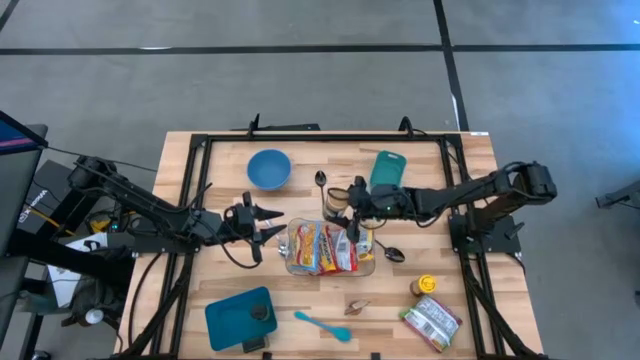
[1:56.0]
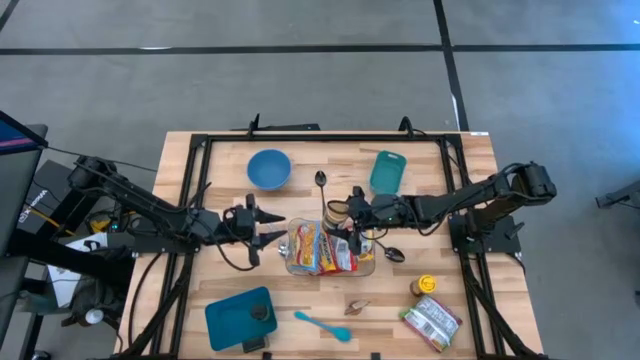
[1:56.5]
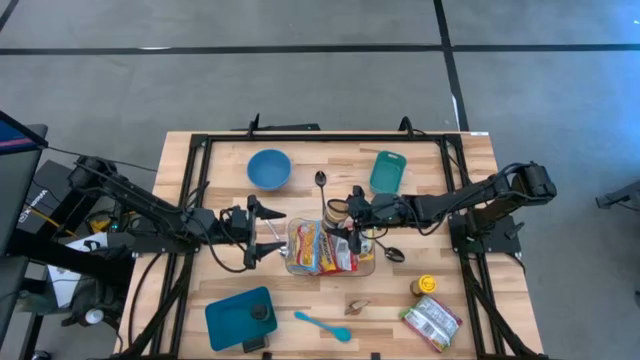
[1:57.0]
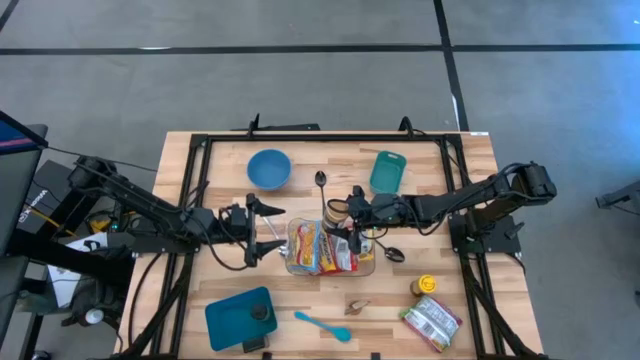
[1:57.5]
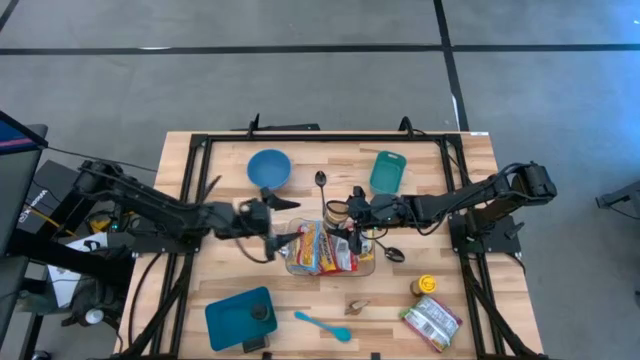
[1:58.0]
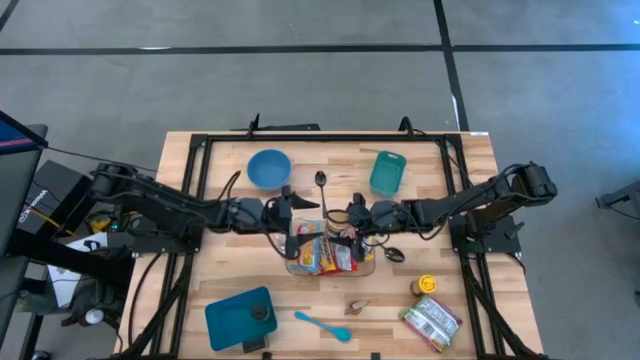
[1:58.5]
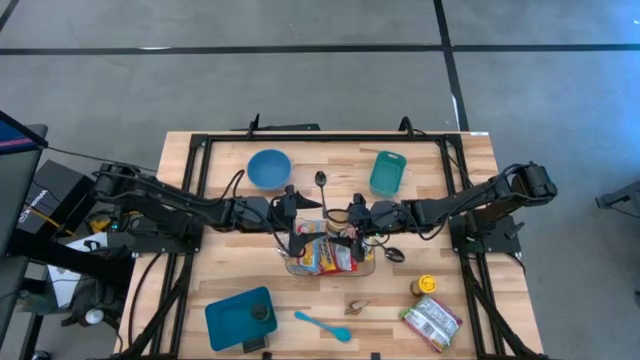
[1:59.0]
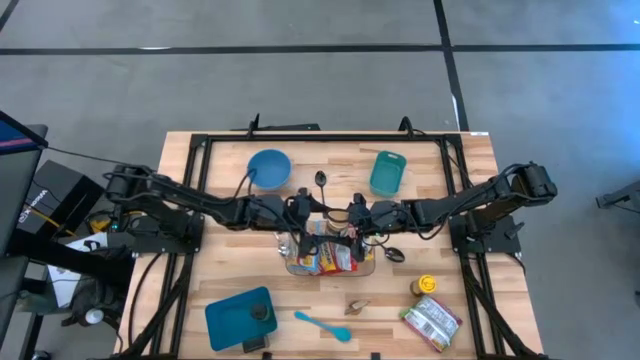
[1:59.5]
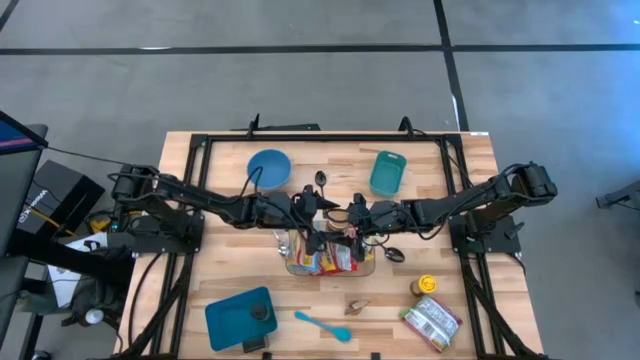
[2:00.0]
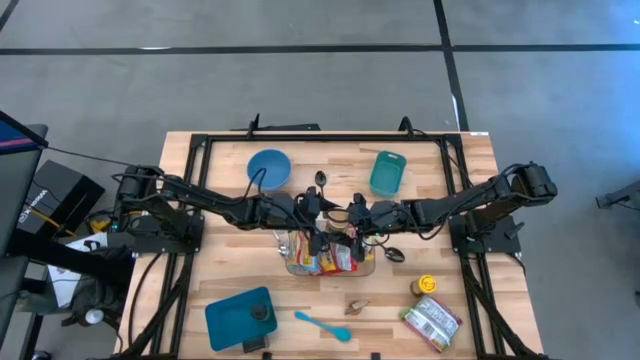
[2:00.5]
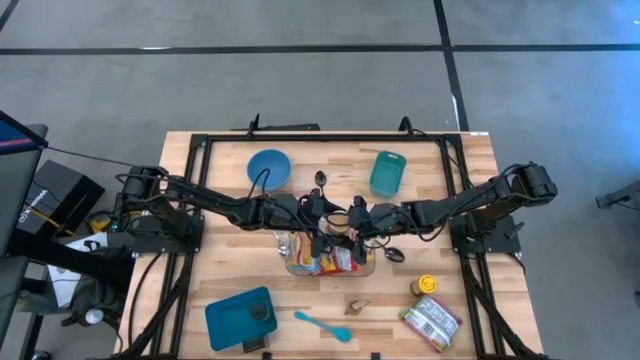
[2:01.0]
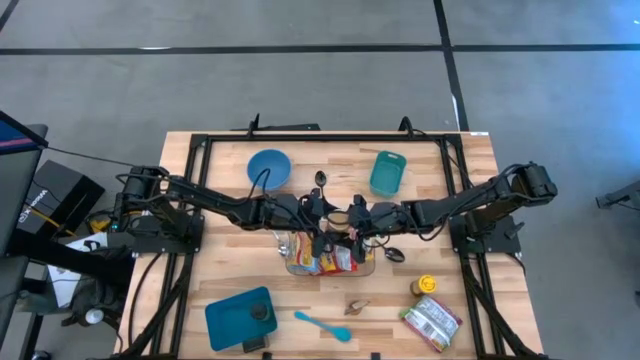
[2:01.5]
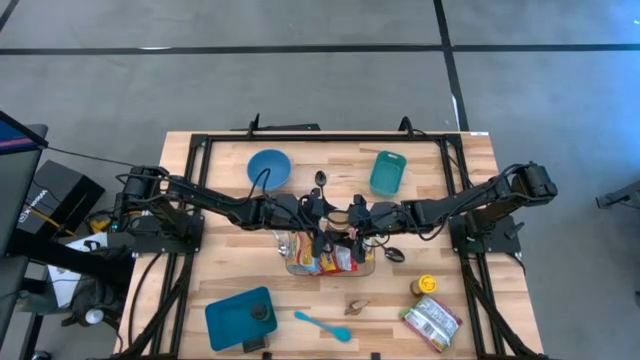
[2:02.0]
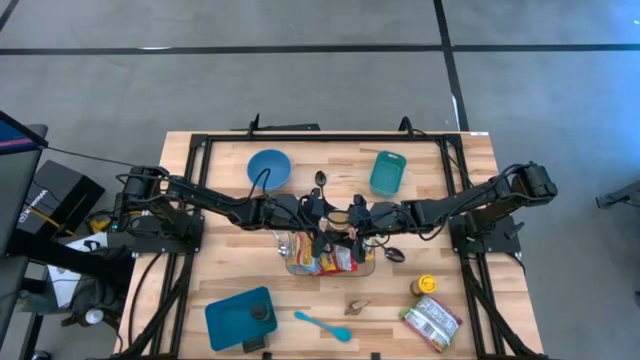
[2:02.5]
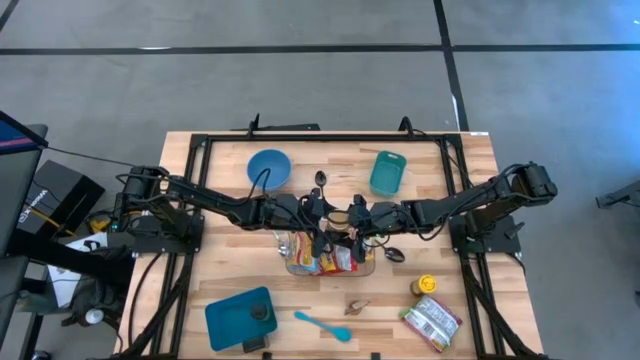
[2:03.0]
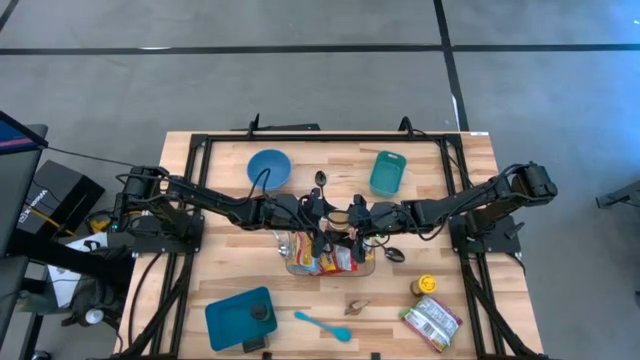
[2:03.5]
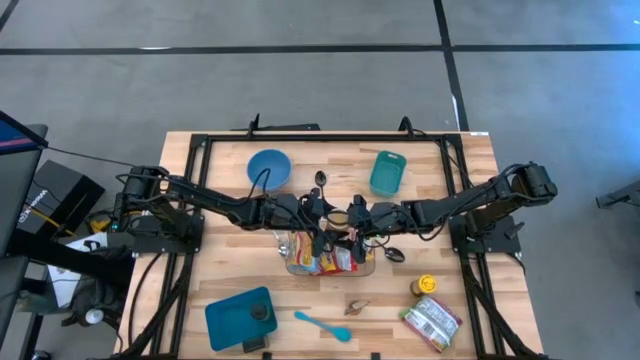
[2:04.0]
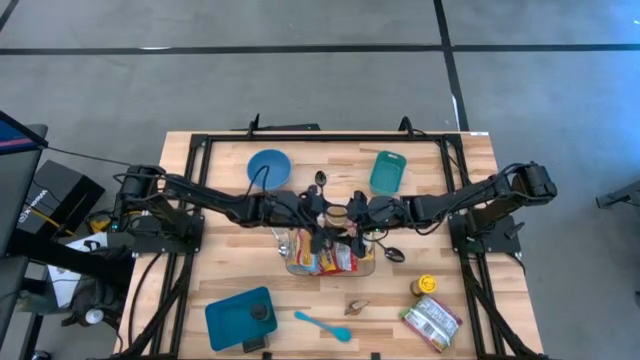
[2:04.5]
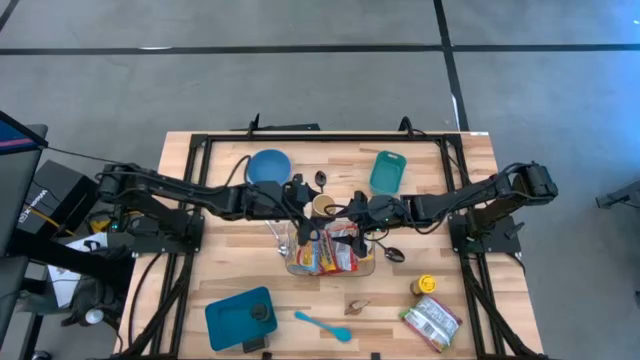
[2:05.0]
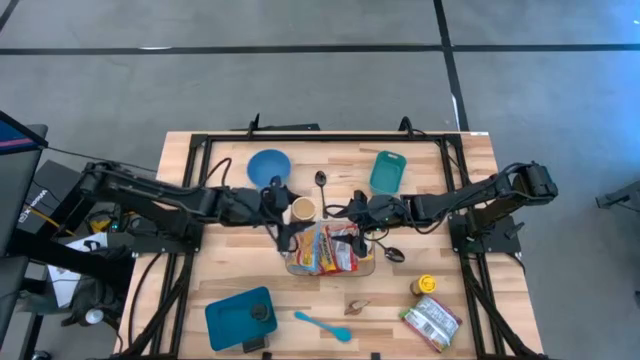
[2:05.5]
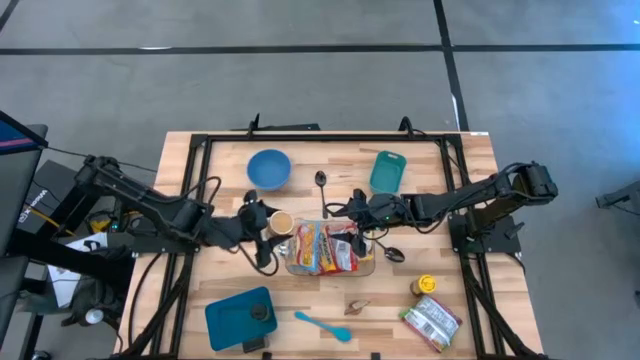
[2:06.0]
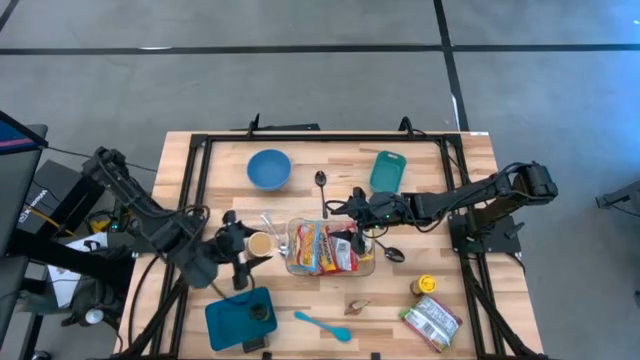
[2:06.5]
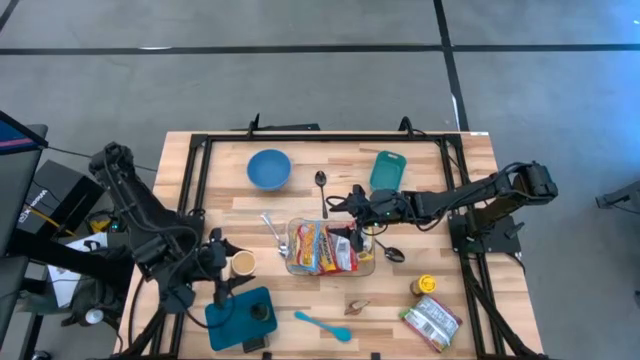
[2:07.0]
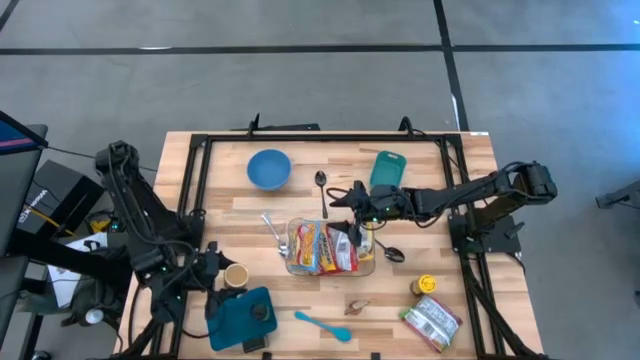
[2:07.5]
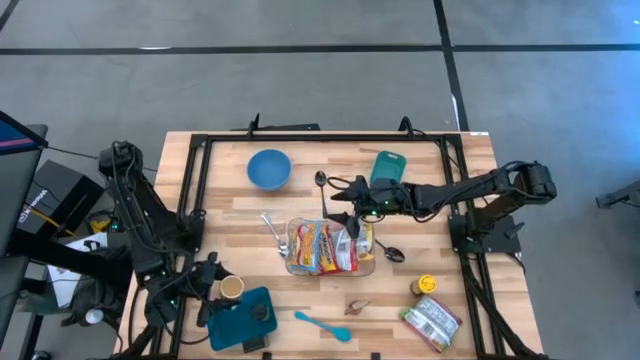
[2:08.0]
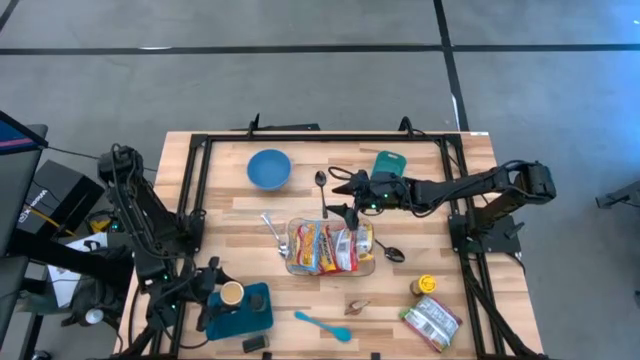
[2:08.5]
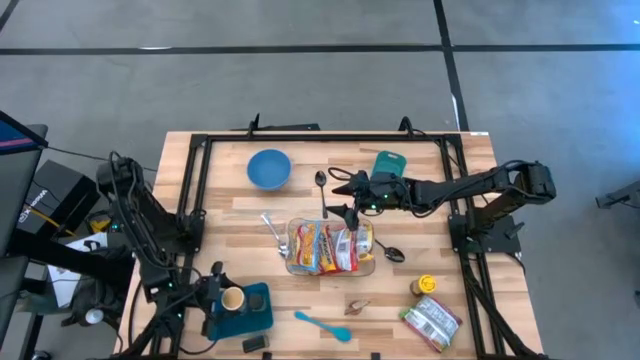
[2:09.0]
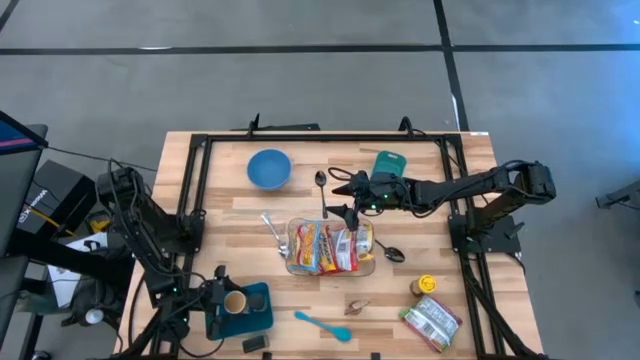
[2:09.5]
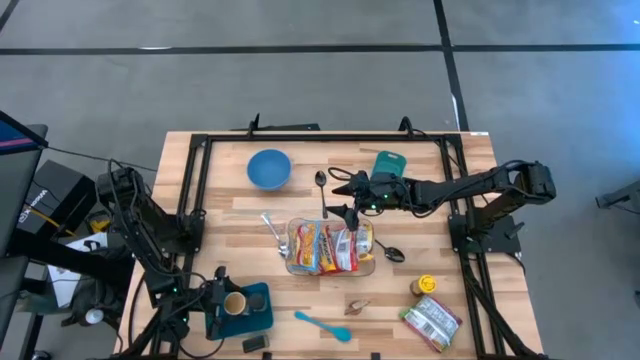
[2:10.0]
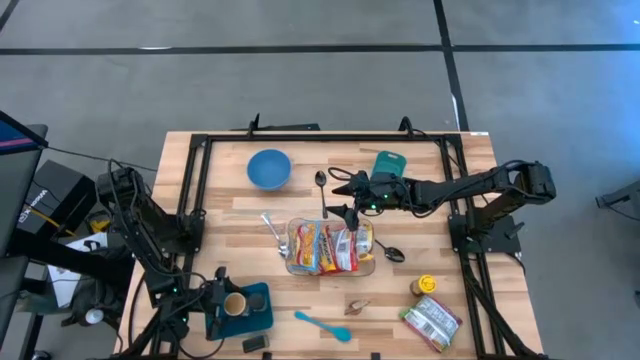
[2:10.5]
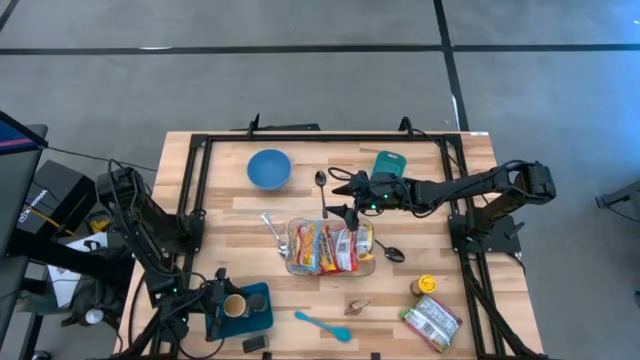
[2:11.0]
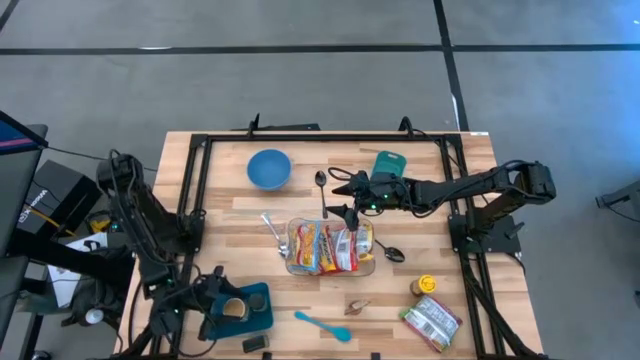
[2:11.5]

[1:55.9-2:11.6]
Task: Pick & Place Food Item
Put the golden spice bottle into the dark blue bin

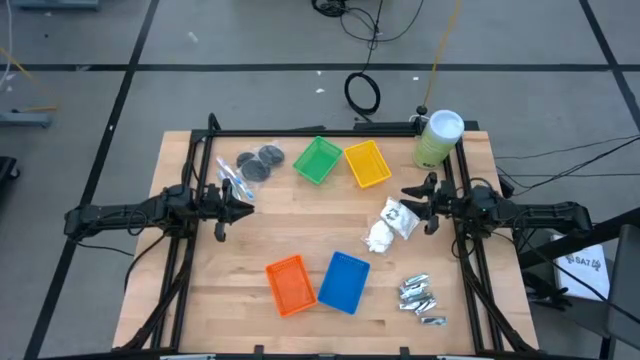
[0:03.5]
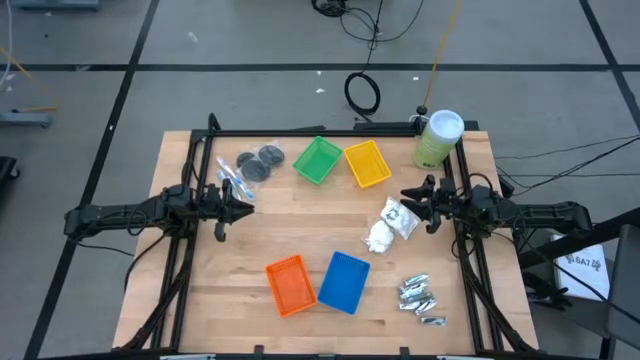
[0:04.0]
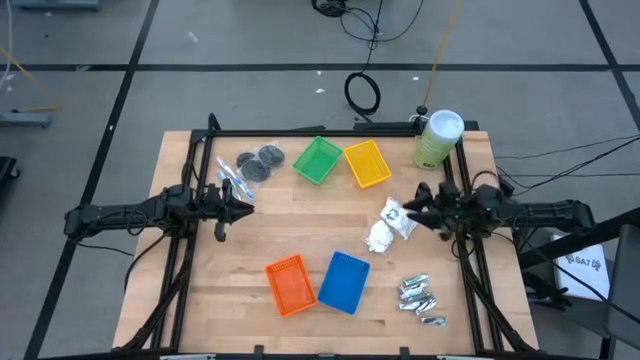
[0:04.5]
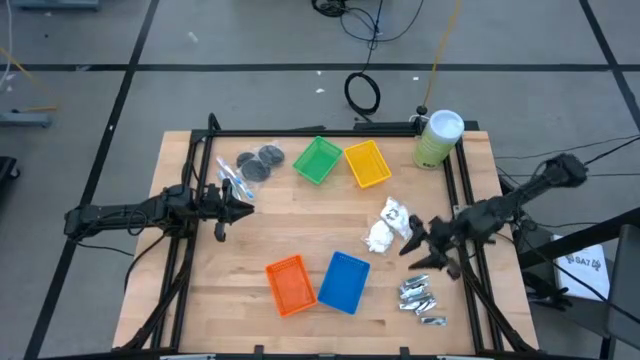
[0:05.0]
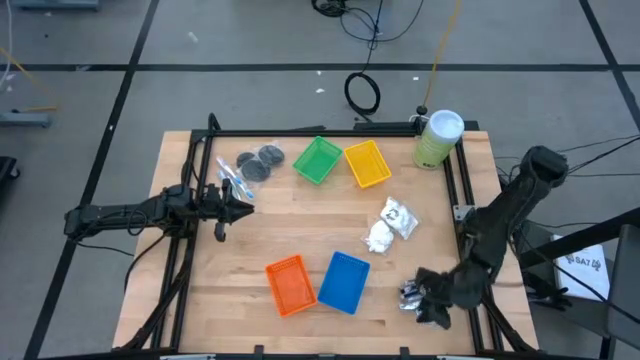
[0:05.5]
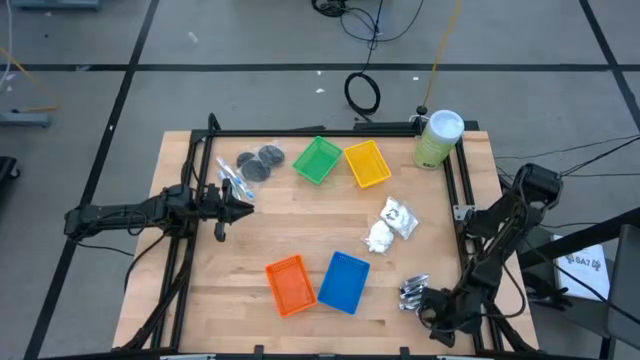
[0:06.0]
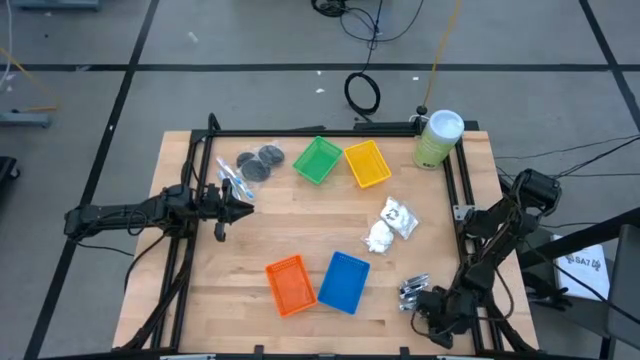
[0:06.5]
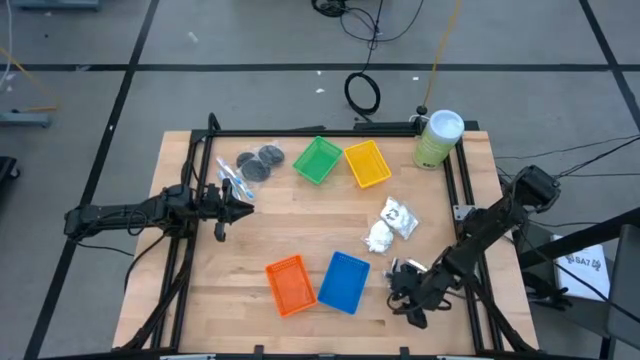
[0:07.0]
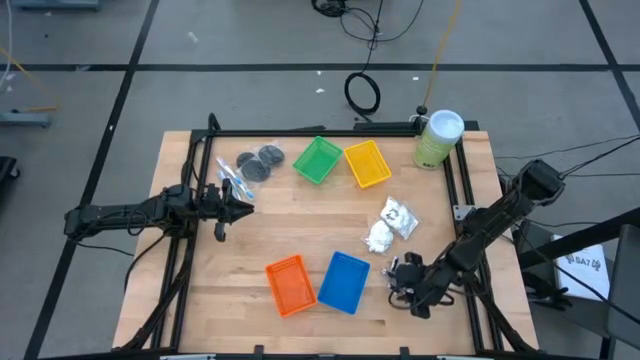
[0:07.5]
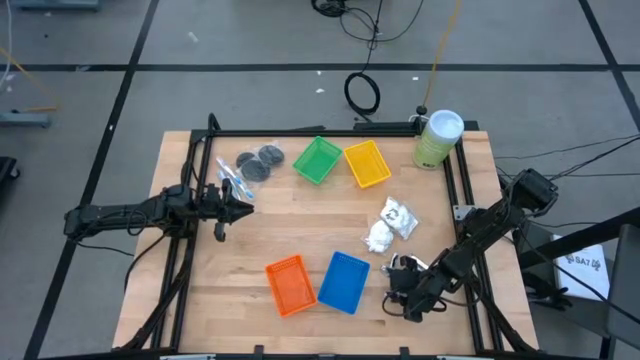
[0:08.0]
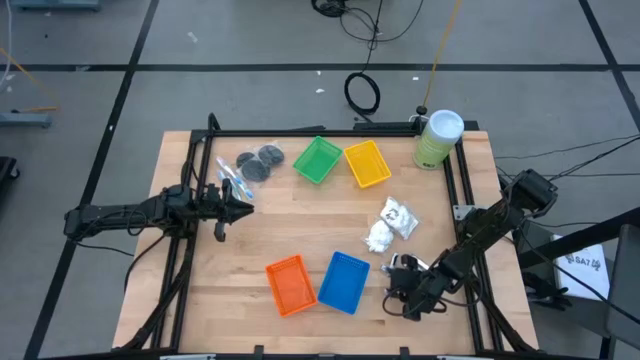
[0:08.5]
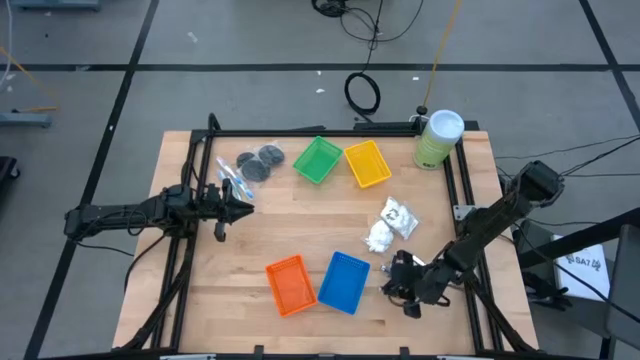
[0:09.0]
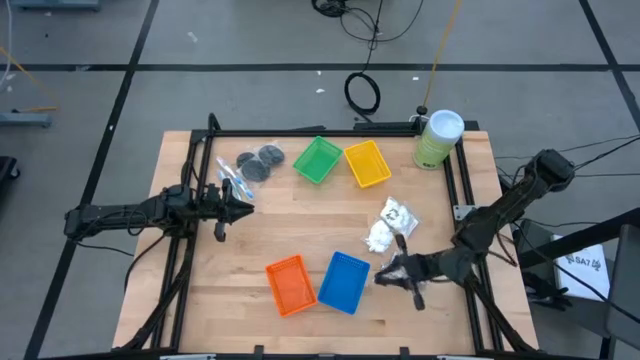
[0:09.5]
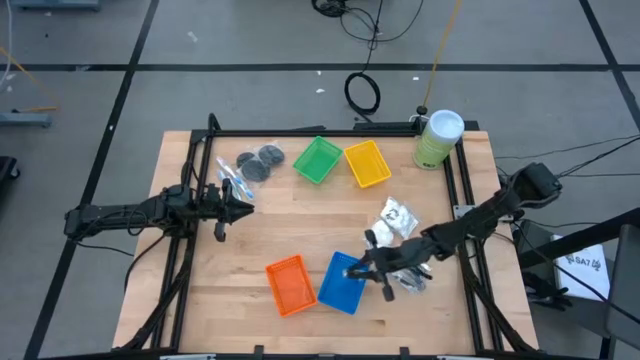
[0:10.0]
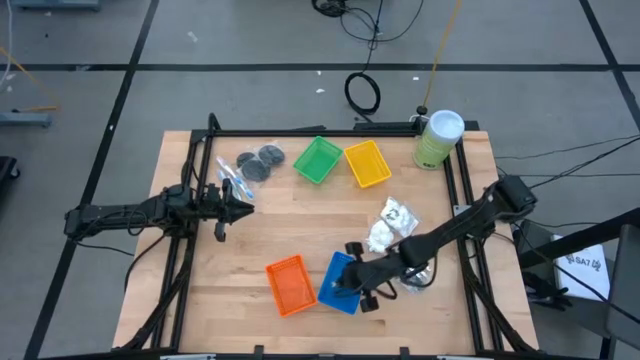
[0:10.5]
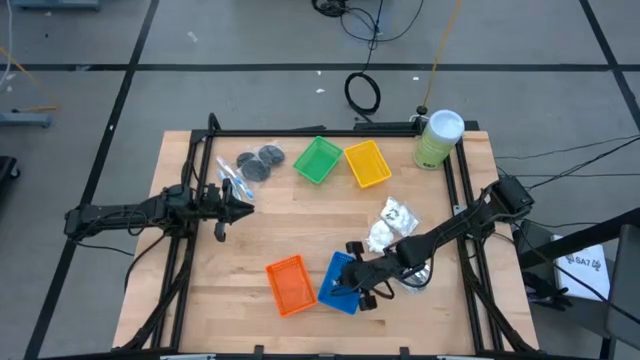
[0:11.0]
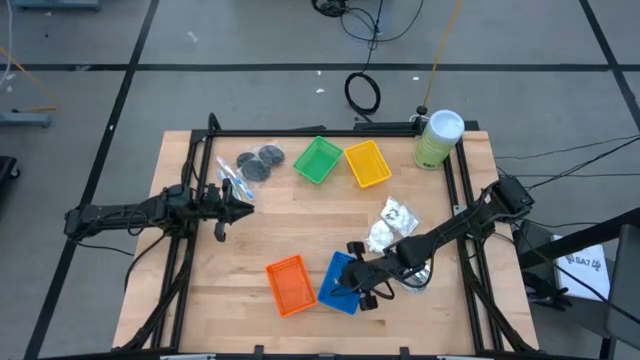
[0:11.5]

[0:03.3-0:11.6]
Task: Pick & Place Travel size toiletries
Put the silver nail cutter into the blue bin
